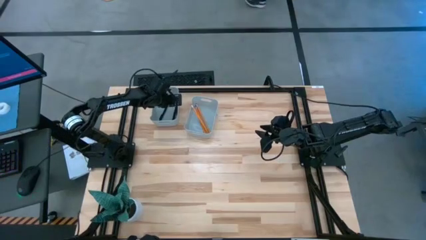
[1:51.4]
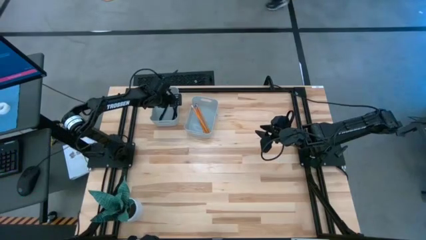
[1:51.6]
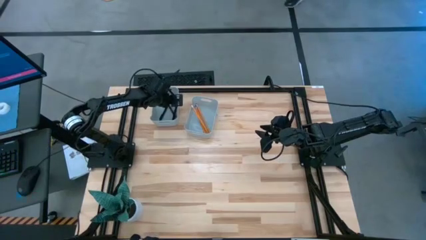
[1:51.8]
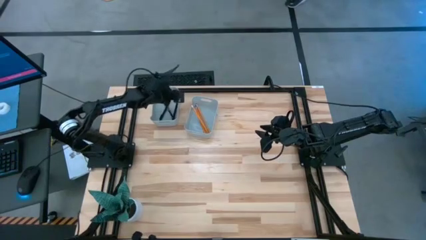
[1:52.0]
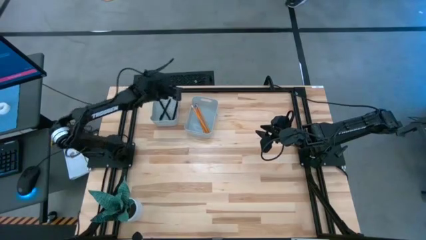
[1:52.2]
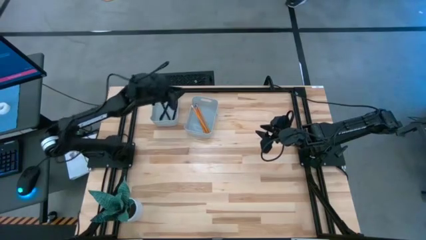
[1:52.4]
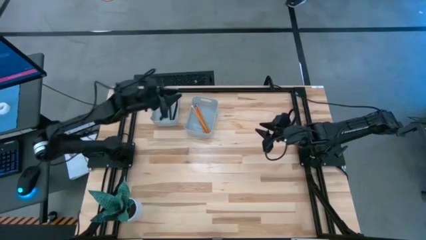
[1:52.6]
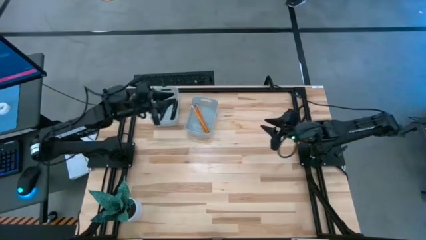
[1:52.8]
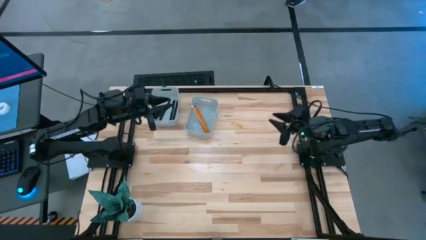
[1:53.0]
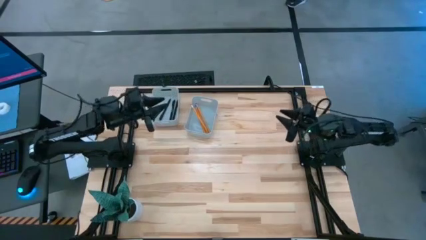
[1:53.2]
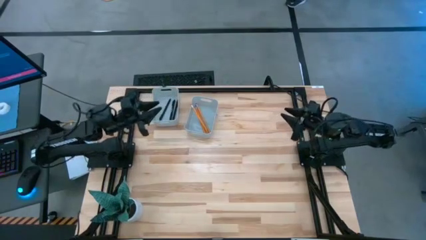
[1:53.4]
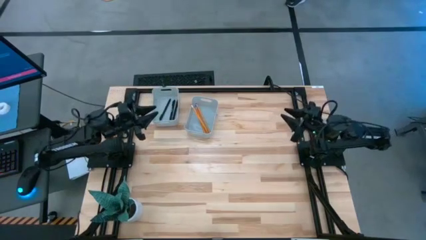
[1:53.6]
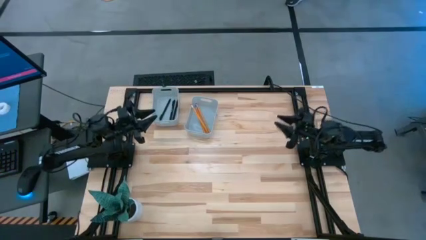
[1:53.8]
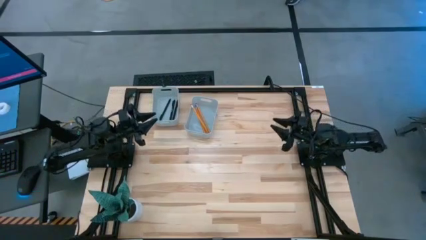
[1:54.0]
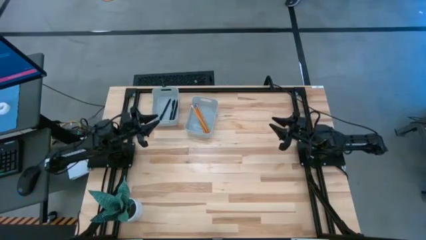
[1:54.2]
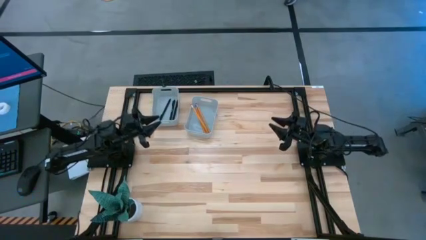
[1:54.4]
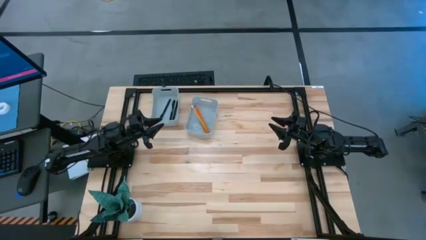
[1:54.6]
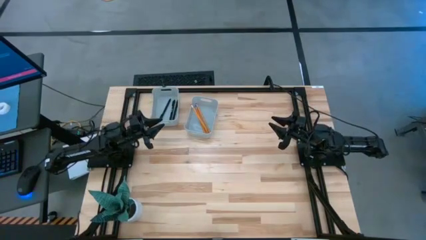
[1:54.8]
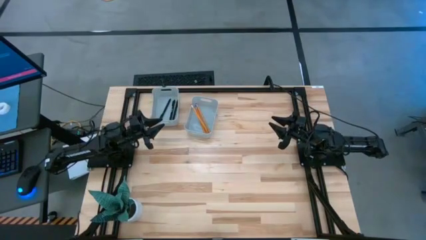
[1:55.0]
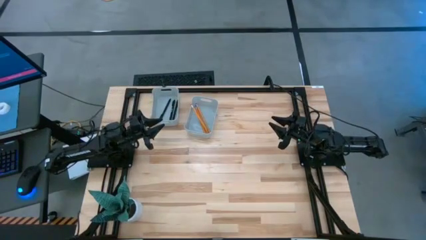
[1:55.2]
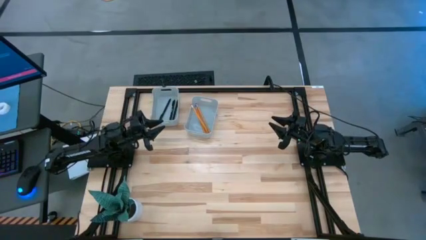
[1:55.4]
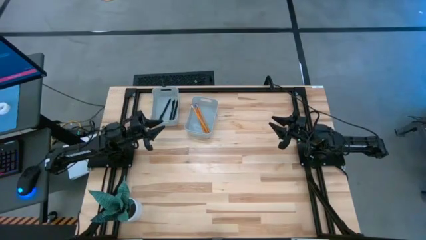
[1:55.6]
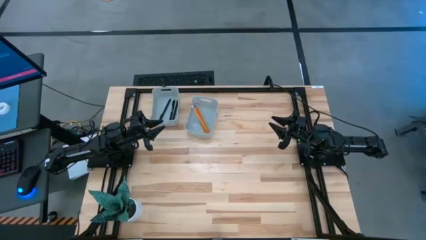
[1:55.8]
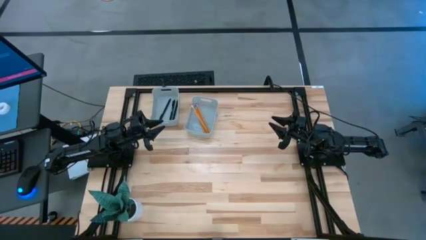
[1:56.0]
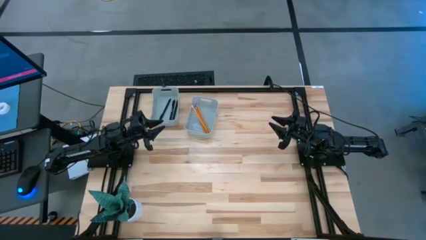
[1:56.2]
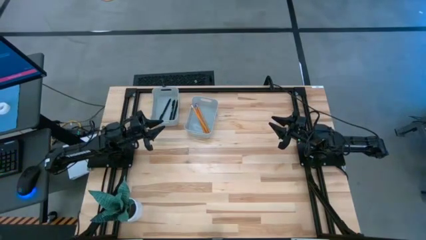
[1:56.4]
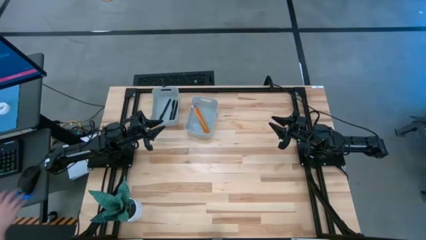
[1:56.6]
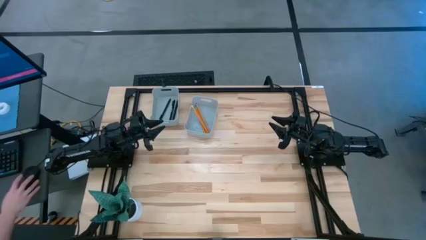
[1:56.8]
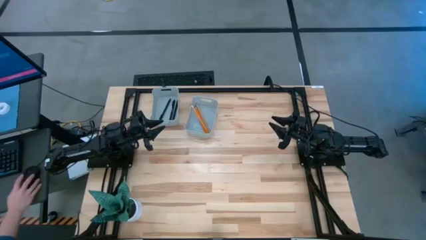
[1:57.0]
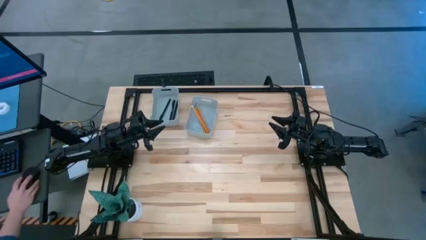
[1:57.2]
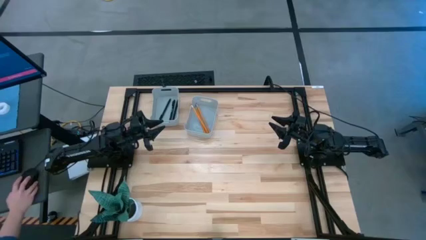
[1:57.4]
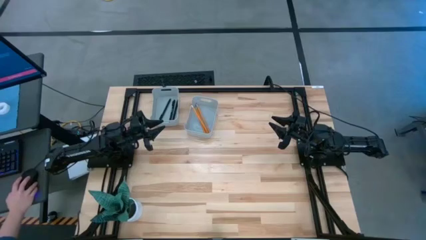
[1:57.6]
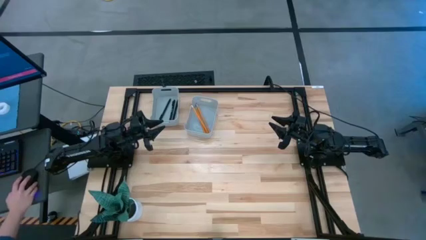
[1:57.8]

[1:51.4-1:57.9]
Task: Sort pens & pencils
Return to Home Position

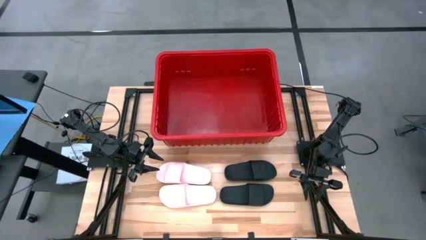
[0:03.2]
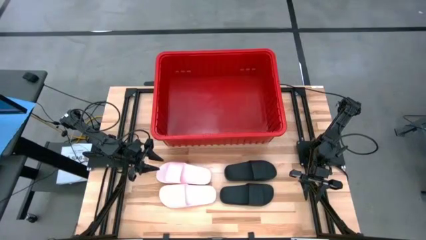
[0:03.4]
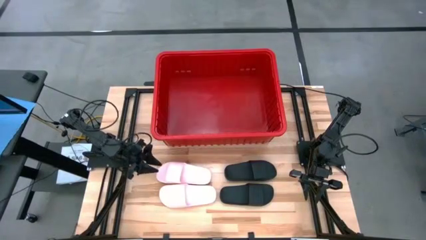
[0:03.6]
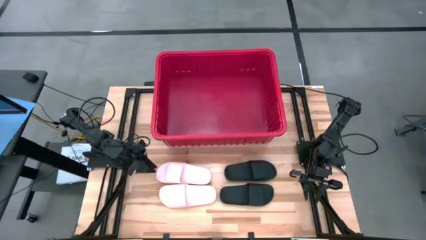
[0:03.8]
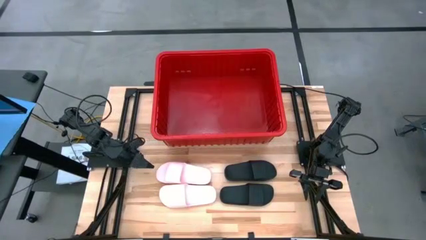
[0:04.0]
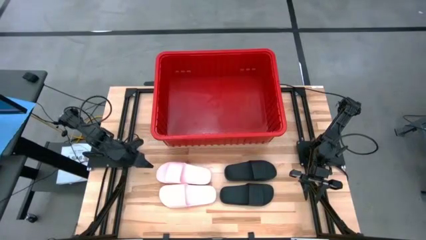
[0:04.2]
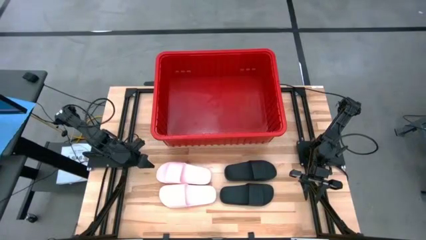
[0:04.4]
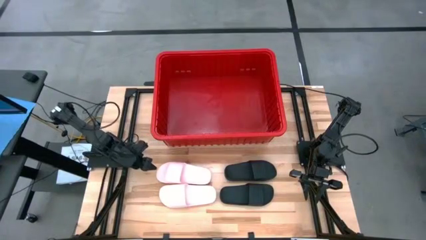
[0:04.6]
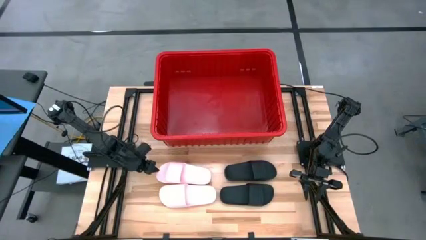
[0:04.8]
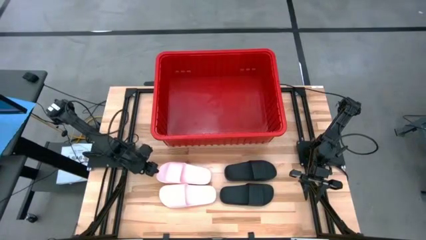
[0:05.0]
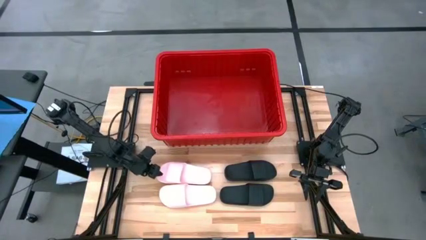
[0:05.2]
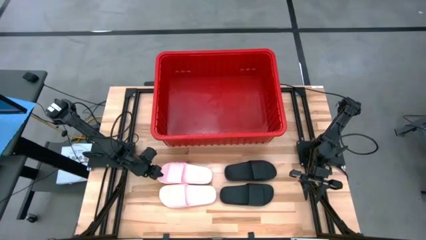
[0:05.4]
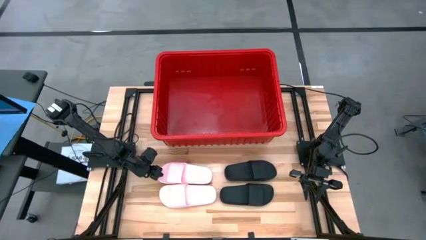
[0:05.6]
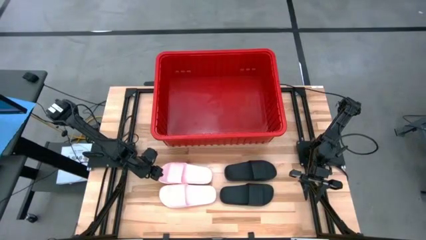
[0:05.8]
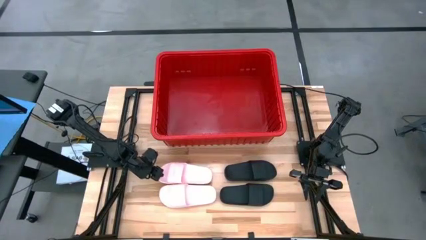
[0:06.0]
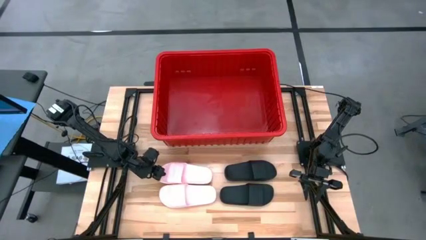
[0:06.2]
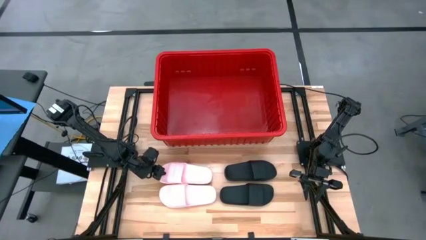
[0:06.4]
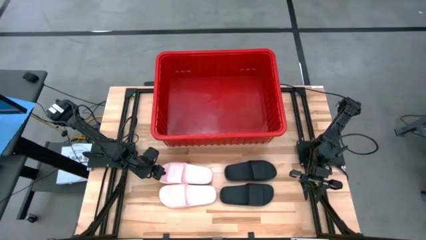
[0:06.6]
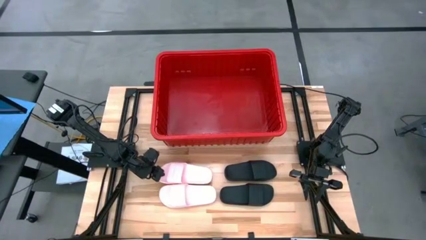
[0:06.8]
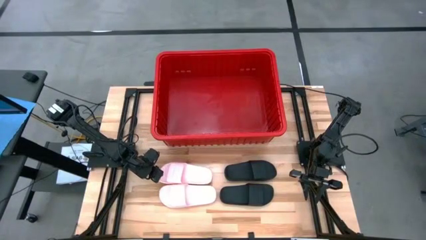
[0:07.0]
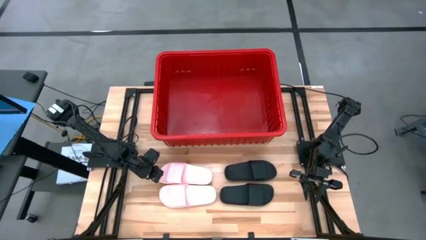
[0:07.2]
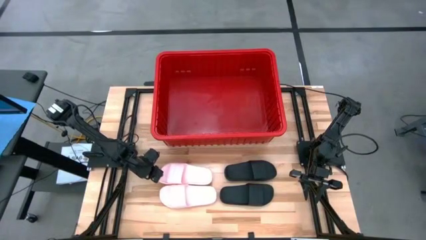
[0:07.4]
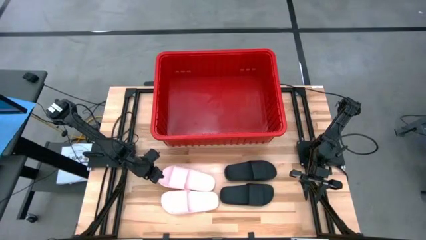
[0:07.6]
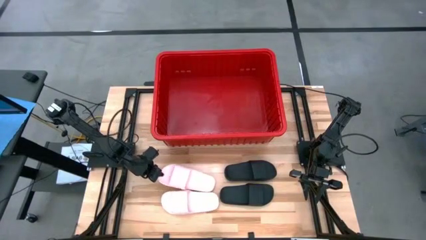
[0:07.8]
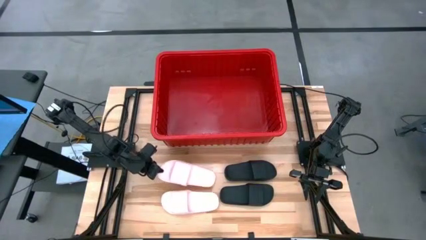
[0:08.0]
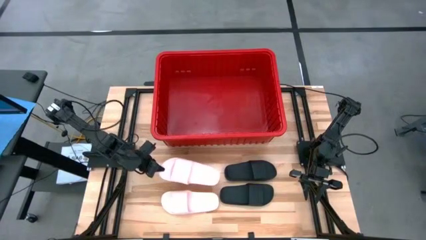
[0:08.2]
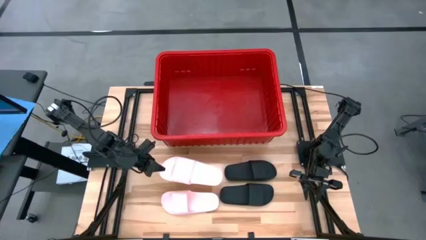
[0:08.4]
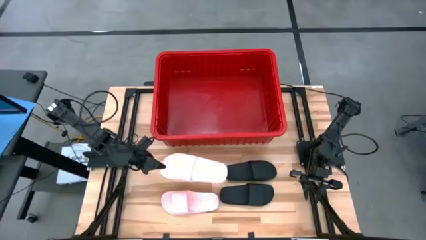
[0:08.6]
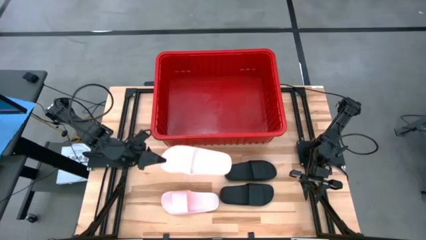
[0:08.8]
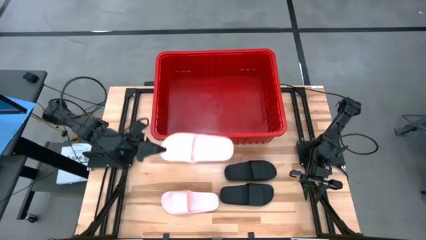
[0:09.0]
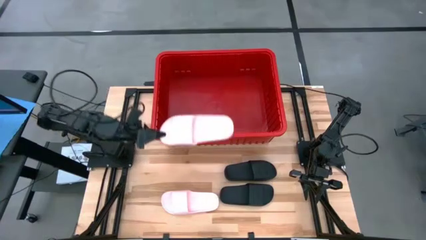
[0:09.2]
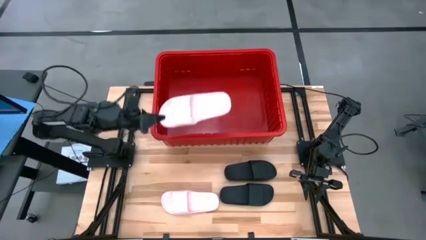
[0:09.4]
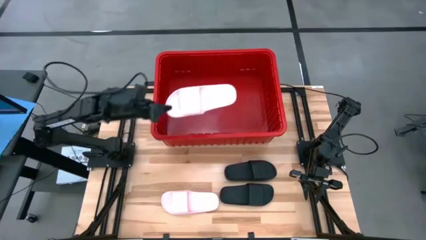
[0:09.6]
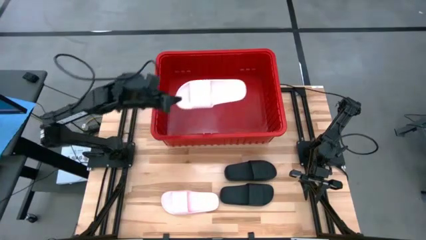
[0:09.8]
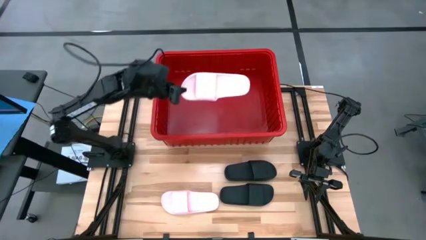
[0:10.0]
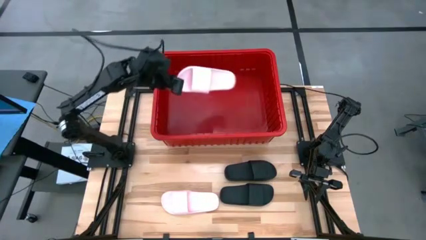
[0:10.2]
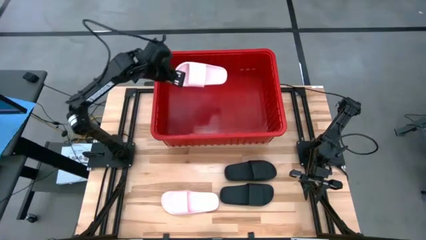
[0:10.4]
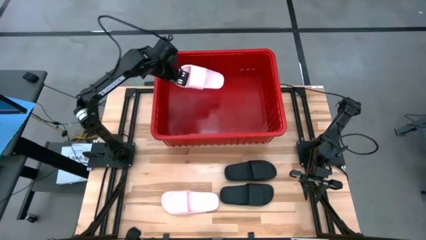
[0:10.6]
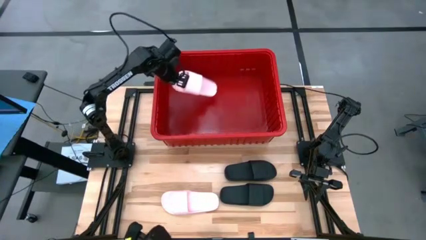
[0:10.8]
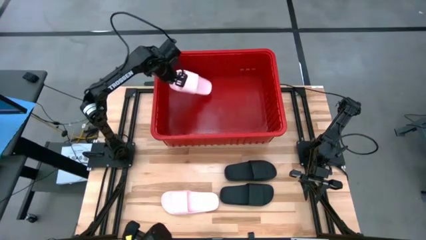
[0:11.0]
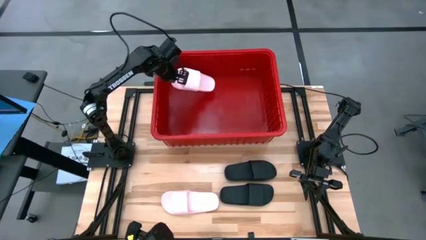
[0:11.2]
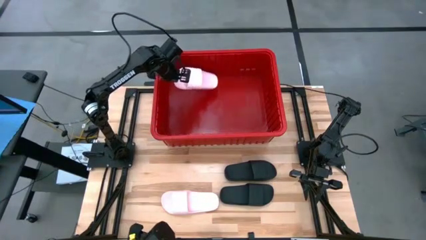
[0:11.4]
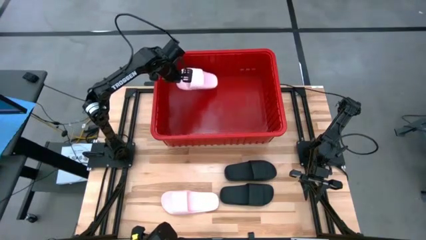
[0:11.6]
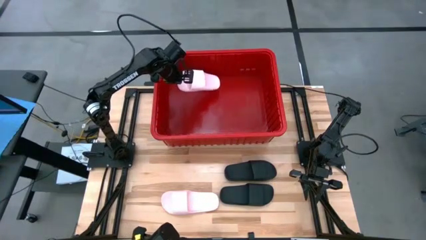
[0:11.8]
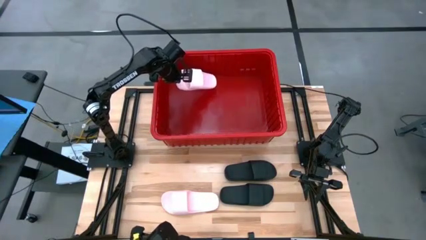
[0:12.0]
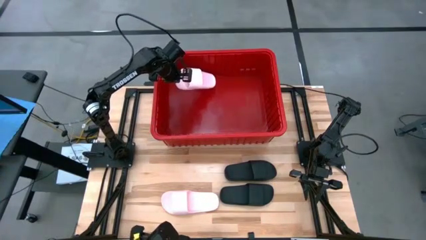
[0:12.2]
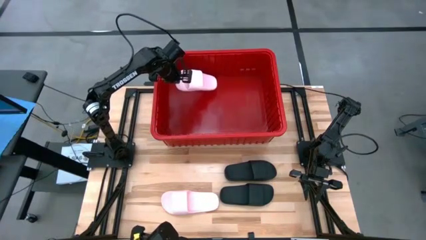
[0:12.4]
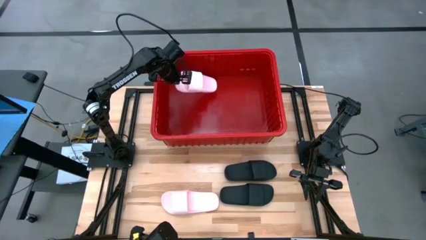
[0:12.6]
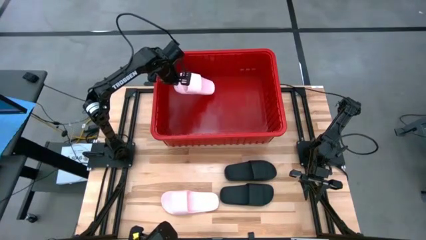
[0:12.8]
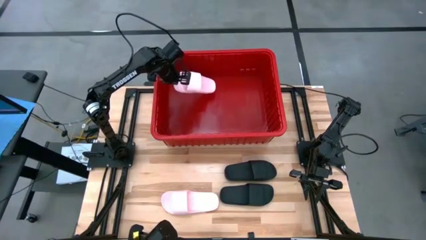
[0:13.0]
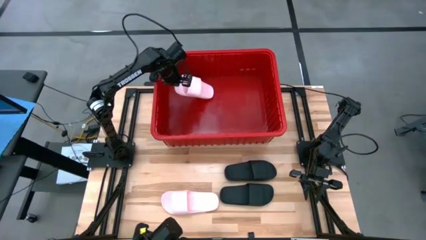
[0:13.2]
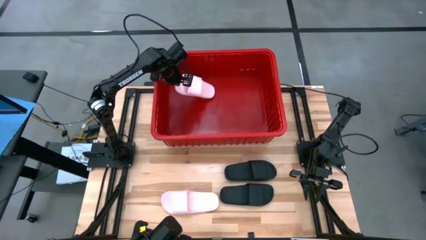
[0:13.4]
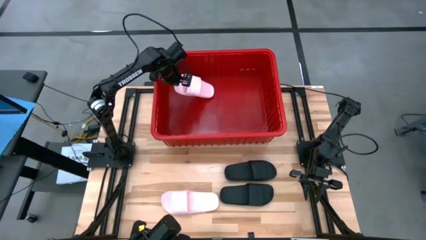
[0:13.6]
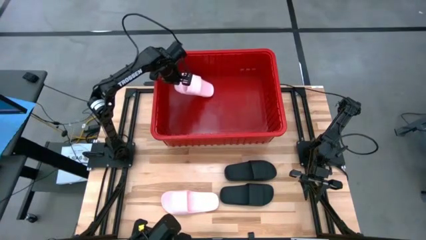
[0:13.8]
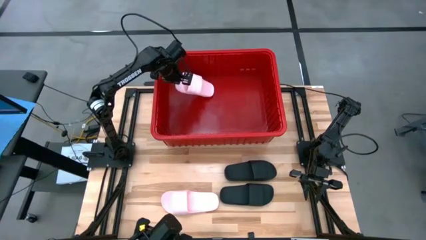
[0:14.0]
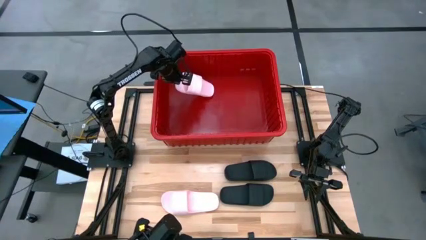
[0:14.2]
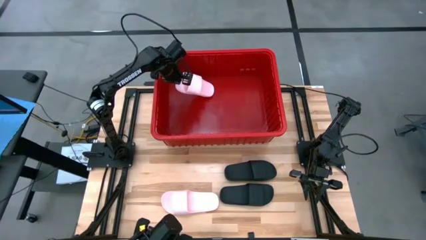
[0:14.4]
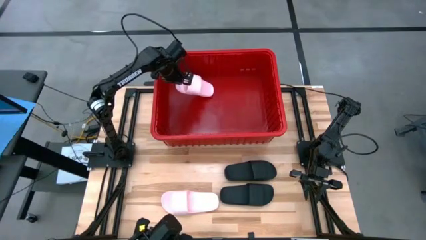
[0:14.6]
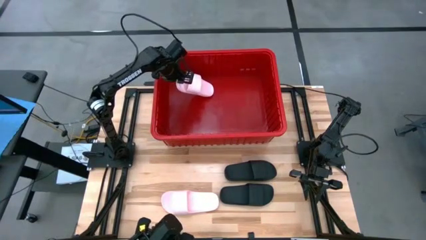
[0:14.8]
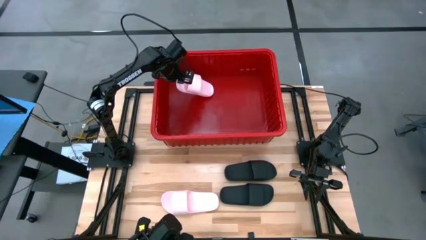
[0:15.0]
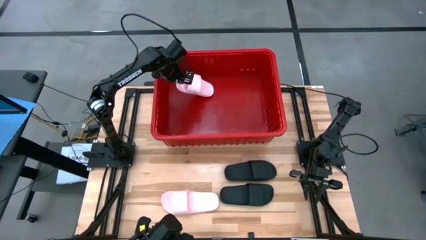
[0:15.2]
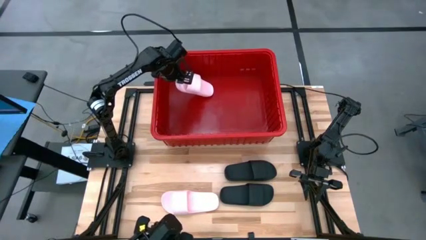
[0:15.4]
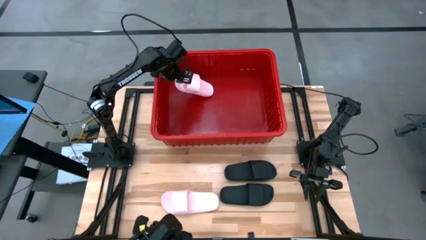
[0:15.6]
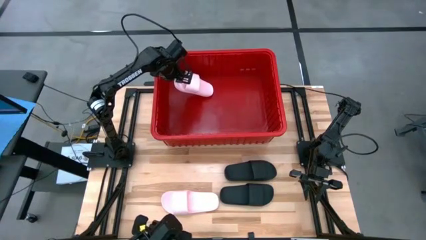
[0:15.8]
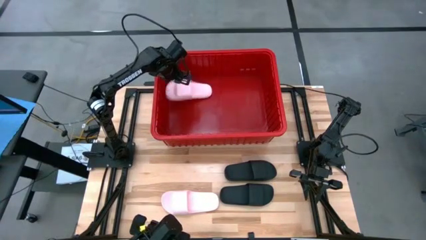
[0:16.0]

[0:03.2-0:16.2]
Task: Pick and place slides into bin
Put the top pink slide into the red bin
